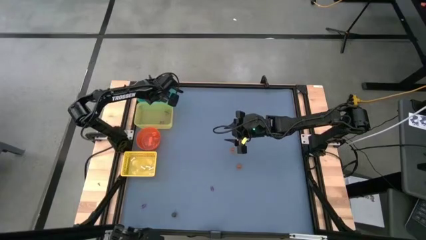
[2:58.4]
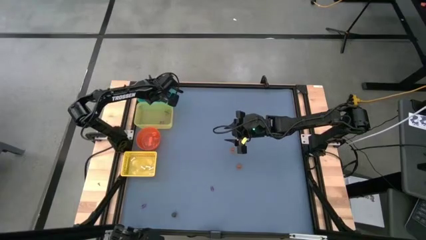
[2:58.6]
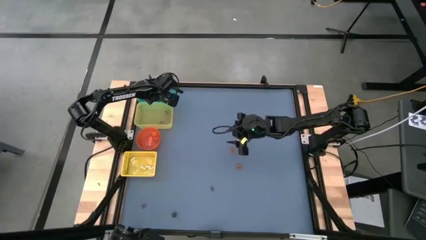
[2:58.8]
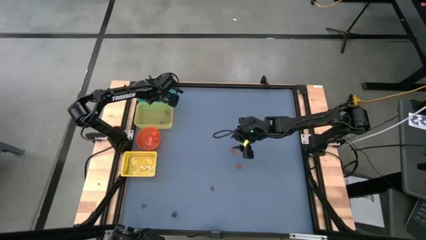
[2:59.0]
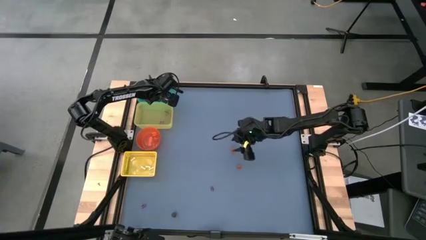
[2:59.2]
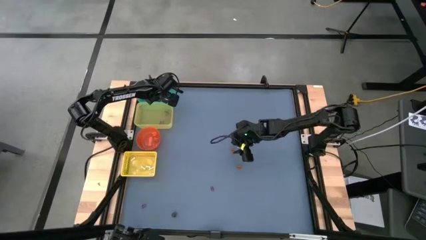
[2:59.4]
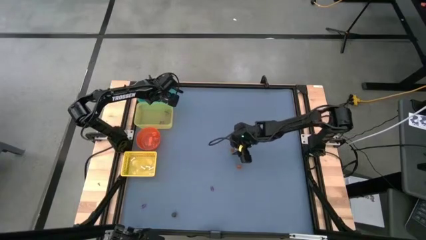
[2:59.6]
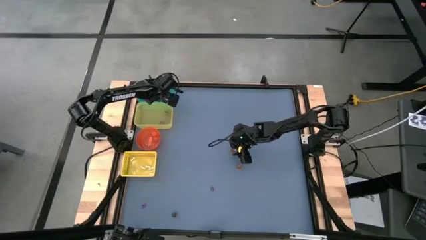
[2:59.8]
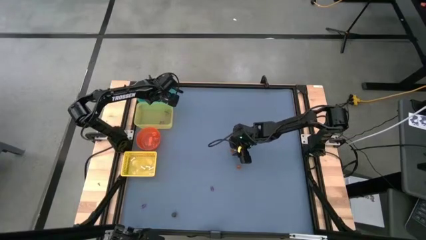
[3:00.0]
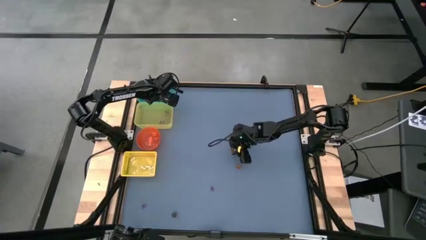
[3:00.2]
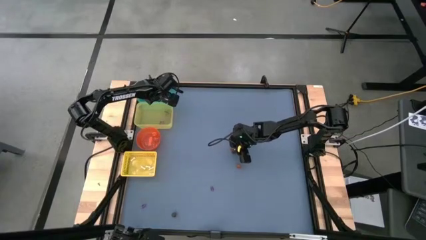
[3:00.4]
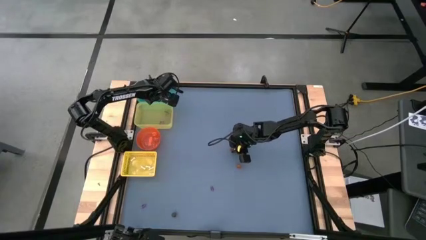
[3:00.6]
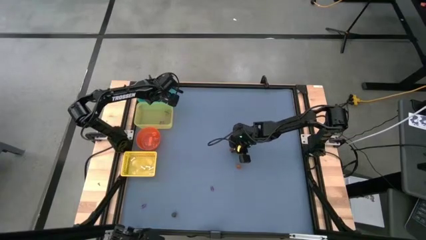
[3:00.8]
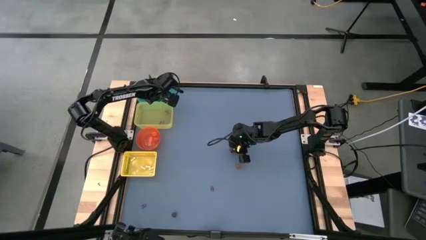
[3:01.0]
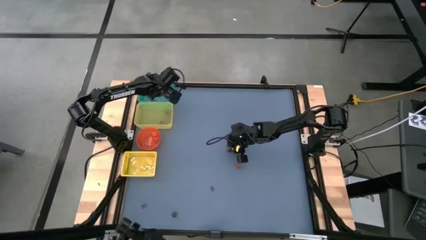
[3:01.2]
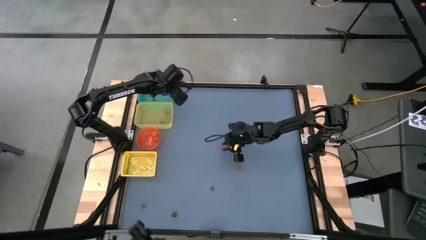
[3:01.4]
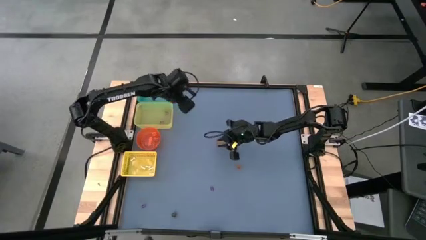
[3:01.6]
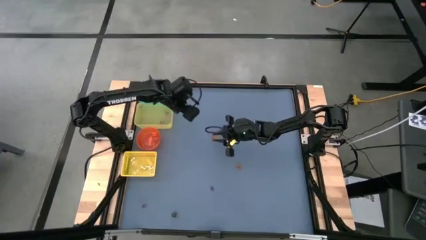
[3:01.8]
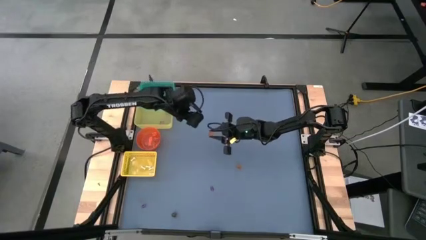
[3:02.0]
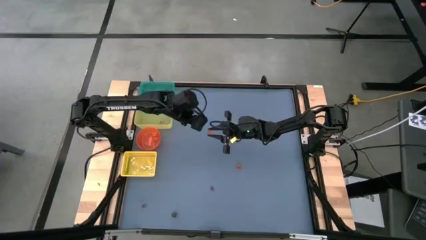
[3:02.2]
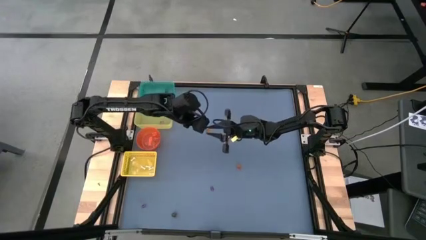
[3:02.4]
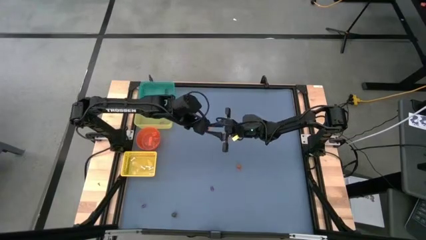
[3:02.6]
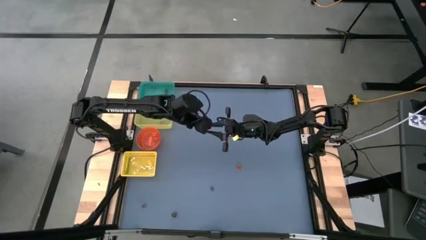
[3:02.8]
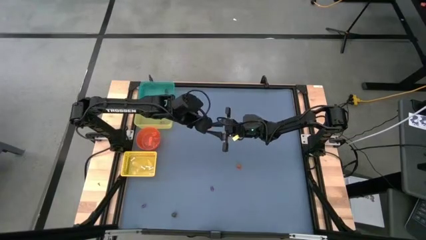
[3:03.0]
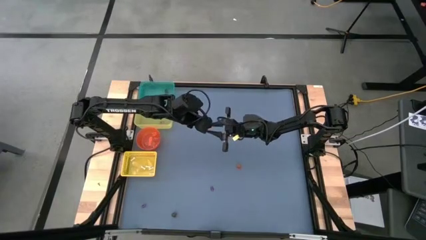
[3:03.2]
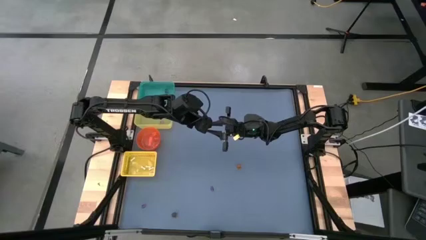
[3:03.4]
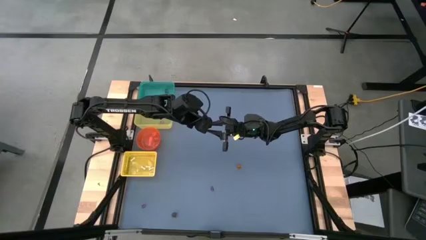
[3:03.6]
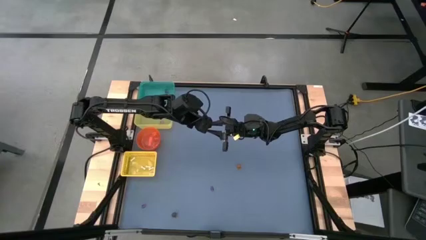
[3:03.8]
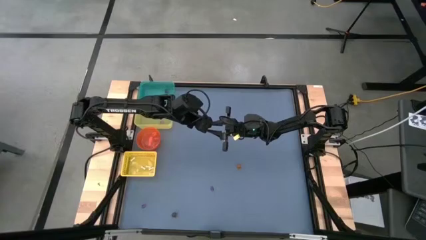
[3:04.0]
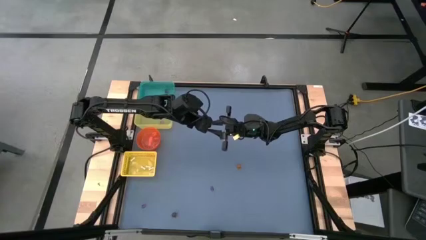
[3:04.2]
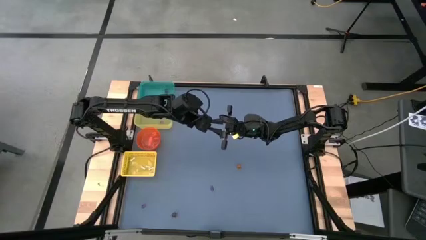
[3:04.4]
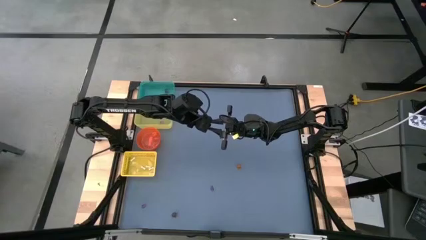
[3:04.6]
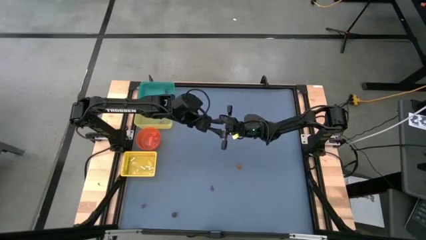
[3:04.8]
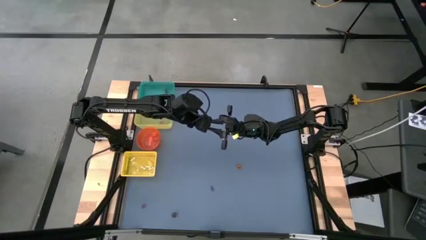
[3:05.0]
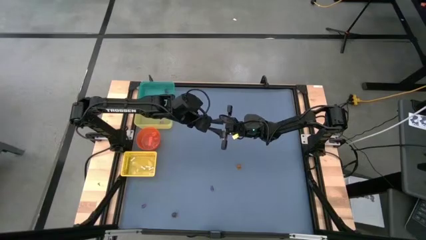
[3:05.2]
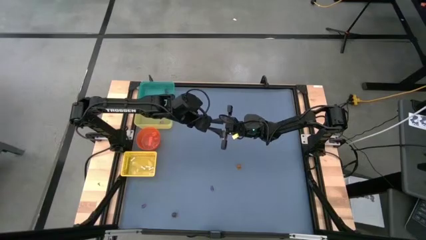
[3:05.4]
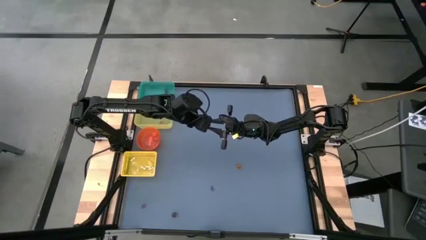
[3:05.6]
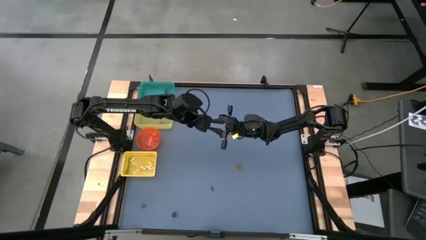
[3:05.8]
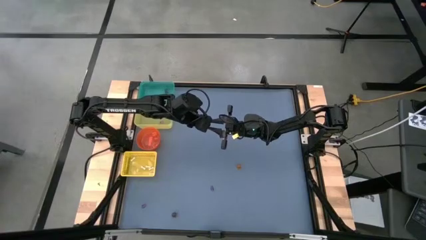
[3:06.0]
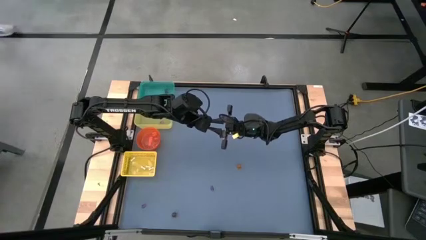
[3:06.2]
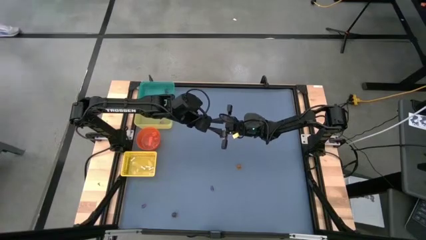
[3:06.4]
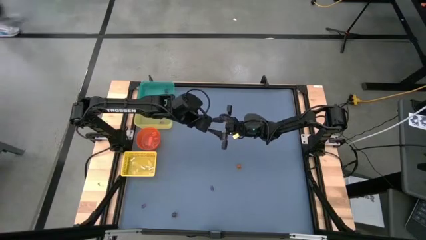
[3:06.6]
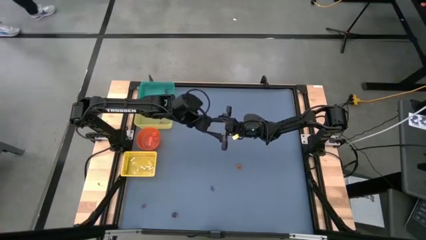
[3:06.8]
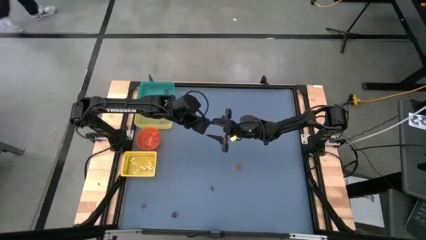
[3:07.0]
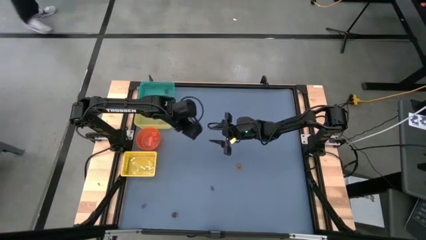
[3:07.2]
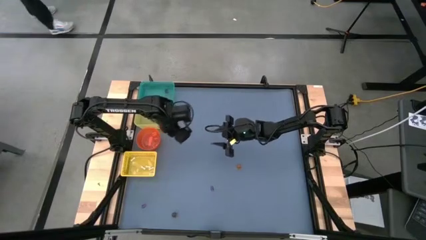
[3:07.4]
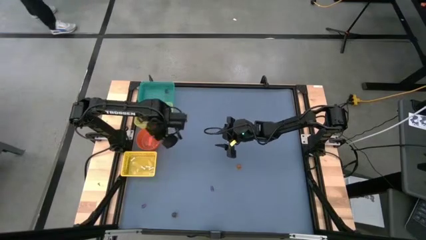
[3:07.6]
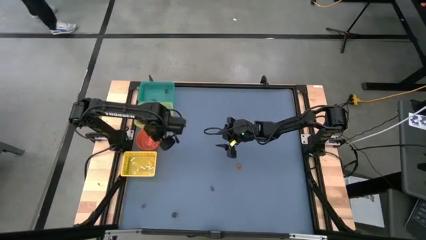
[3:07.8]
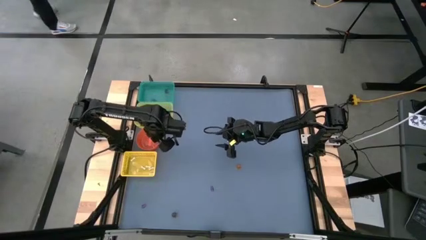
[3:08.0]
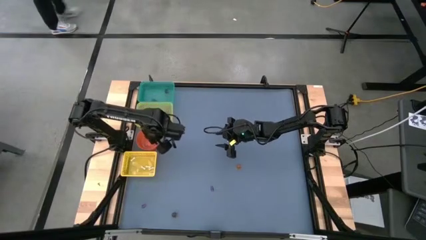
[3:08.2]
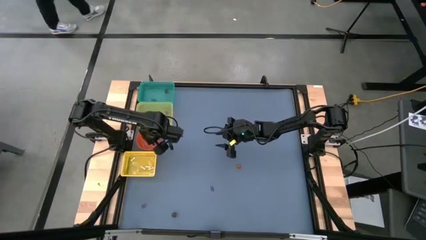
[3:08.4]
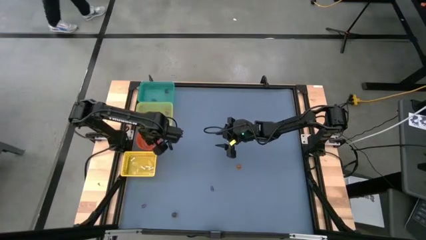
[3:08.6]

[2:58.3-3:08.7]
Task: Sort Halloween decoration
Put the top orange pumpkin toy into the orange bin

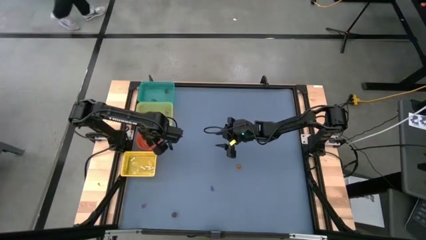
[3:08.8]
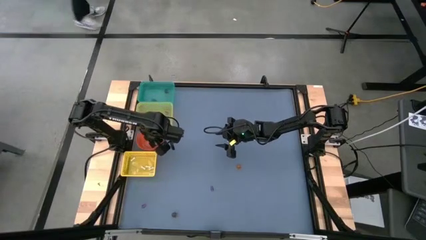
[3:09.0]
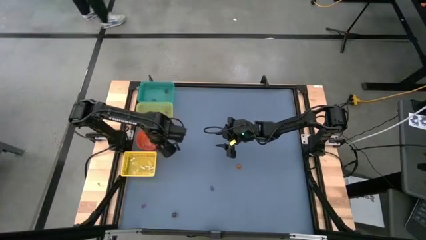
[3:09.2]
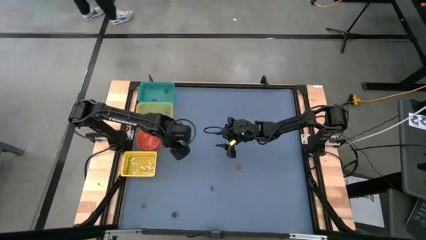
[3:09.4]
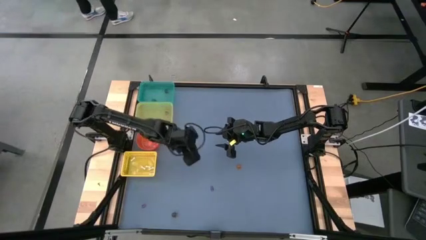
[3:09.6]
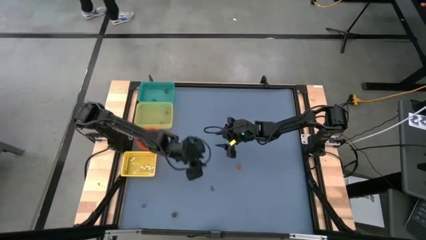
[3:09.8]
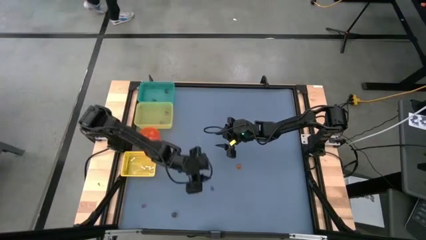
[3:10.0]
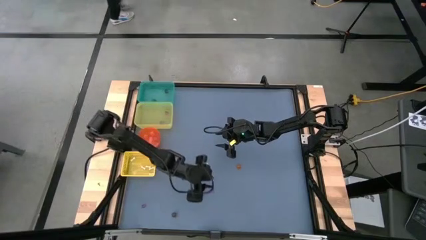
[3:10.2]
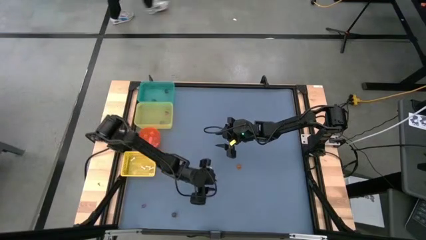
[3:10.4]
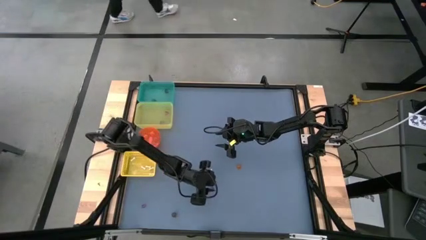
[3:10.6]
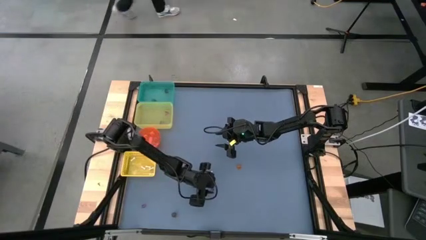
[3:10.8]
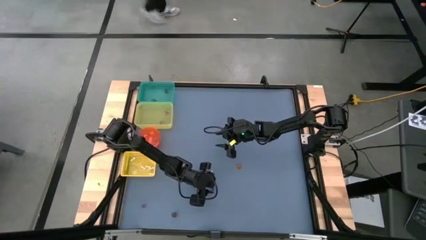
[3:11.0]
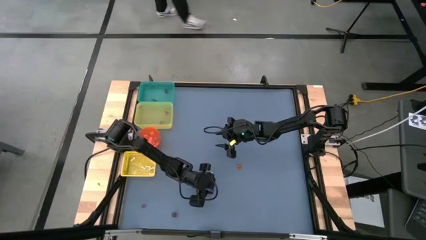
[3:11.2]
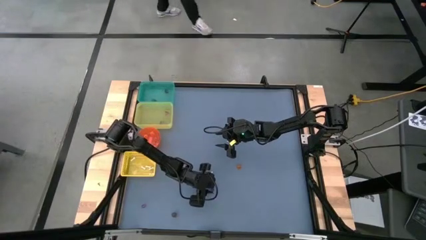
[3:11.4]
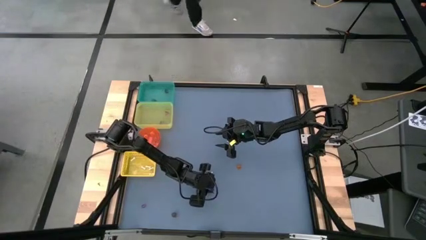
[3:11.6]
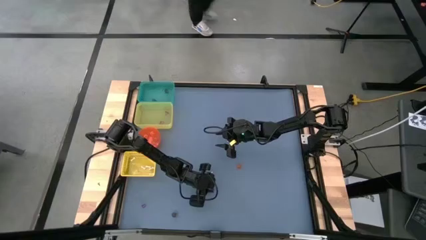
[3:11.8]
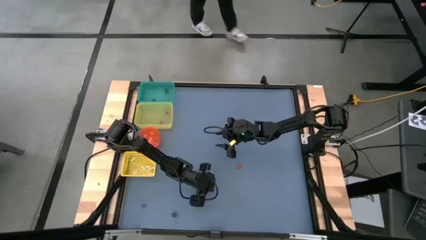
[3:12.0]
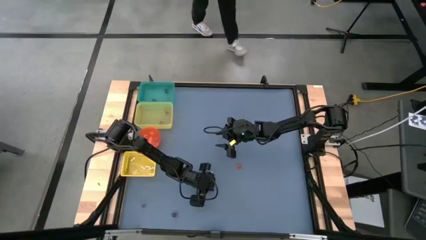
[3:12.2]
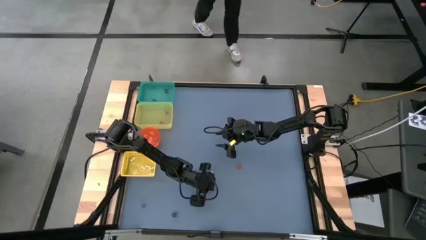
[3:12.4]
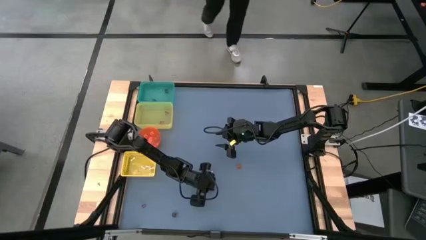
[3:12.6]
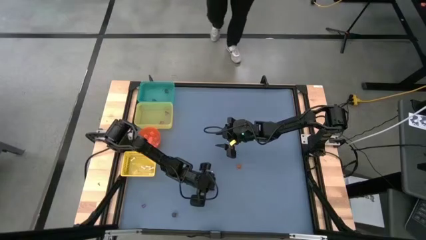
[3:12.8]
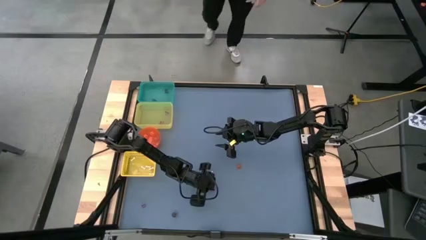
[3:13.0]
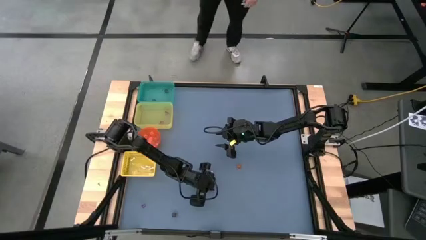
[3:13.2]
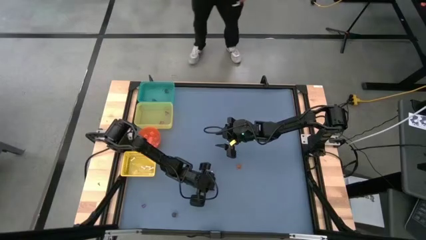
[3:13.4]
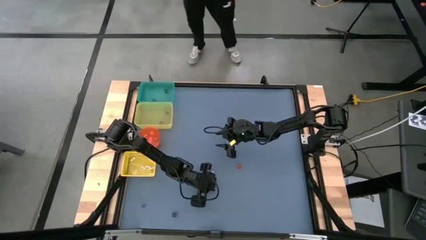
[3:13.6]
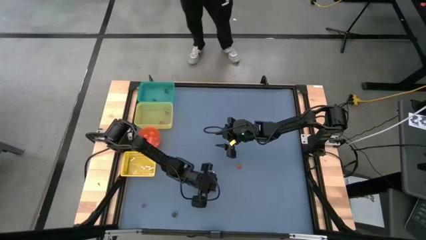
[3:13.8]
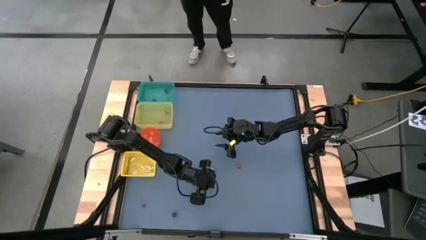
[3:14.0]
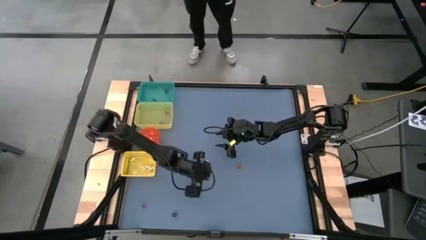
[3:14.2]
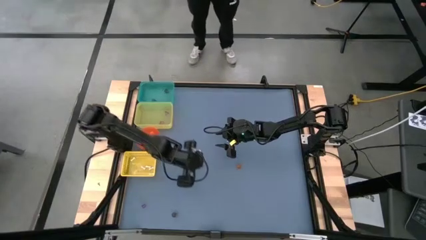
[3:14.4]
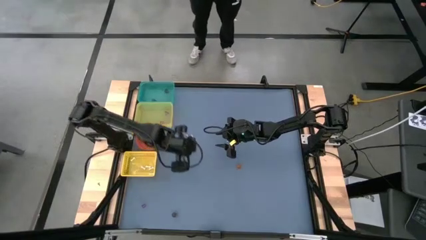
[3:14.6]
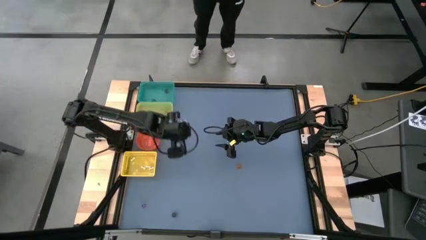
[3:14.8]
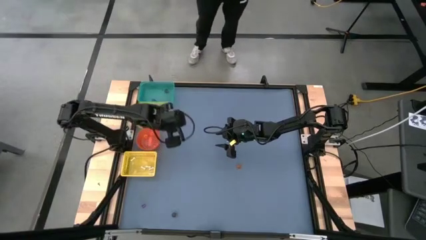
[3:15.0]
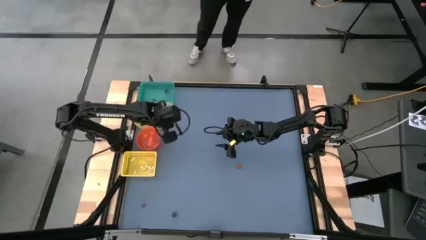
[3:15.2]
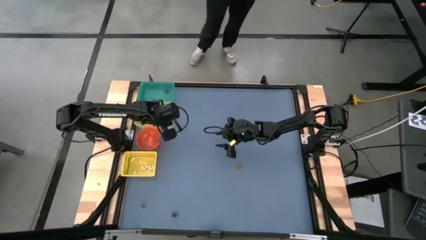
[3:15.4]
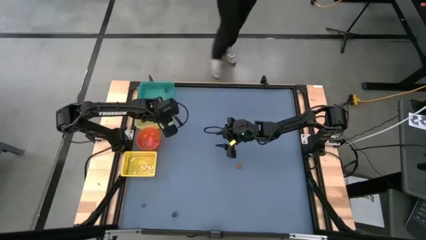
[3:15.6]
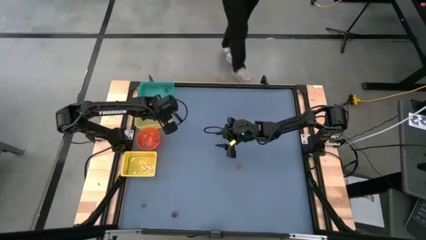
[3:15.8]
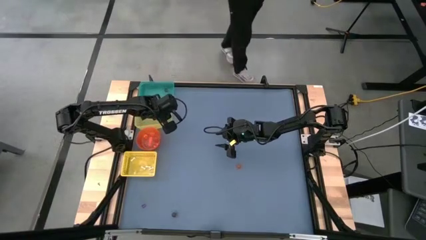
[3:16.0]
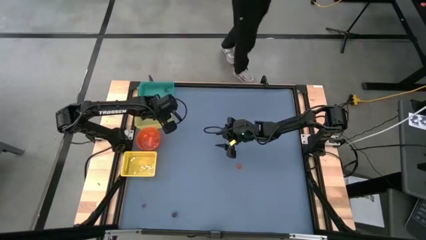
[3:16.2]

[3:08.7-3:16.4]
Put the right purple witch hat toy into the yellow bin
